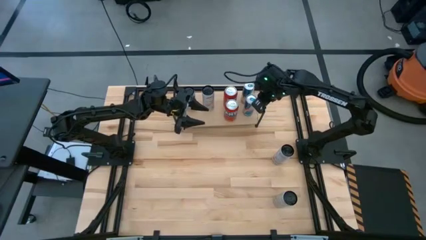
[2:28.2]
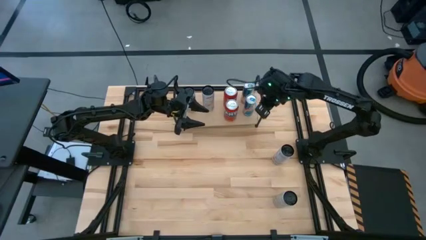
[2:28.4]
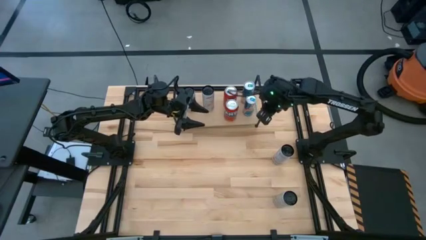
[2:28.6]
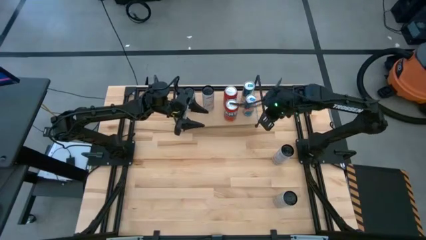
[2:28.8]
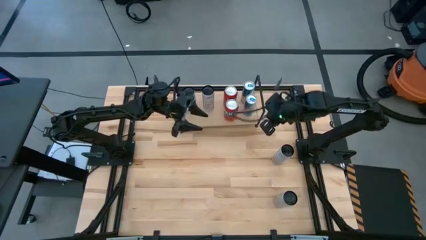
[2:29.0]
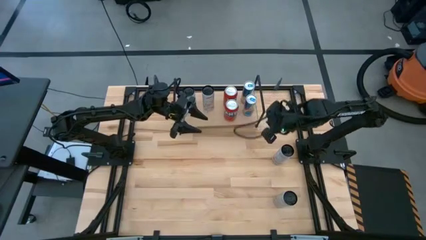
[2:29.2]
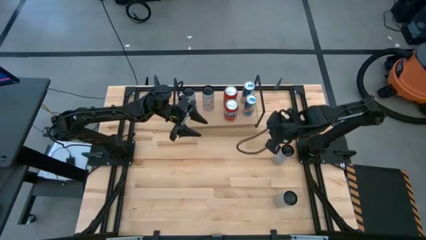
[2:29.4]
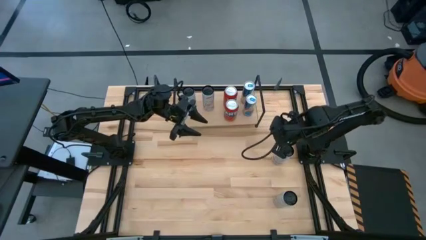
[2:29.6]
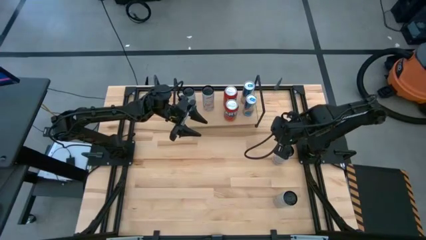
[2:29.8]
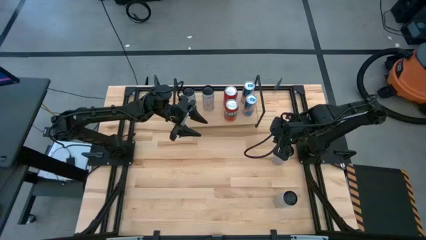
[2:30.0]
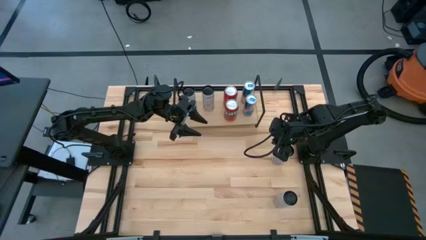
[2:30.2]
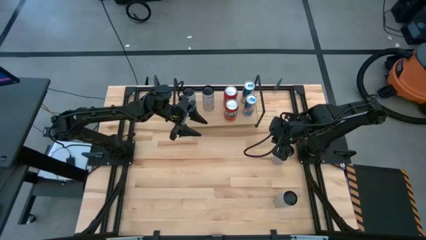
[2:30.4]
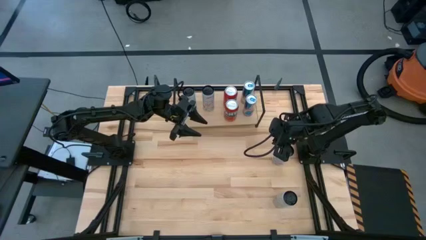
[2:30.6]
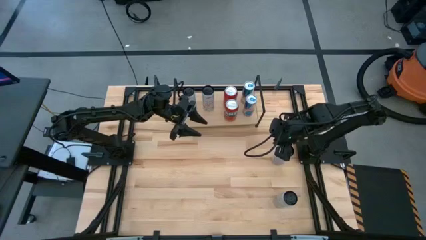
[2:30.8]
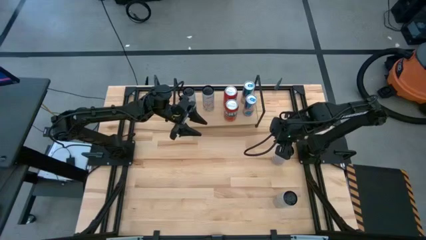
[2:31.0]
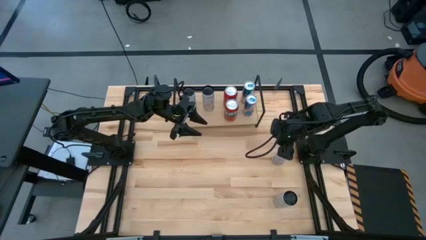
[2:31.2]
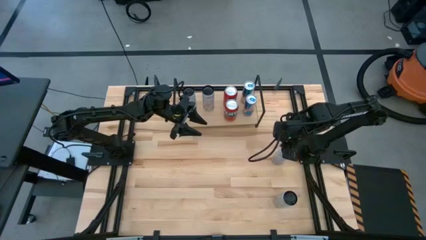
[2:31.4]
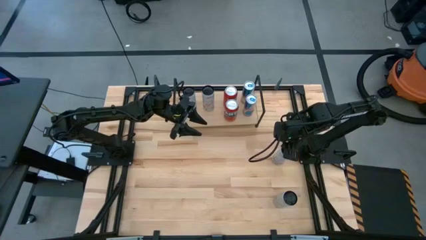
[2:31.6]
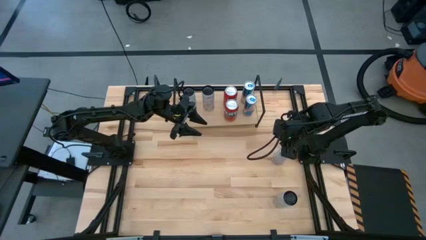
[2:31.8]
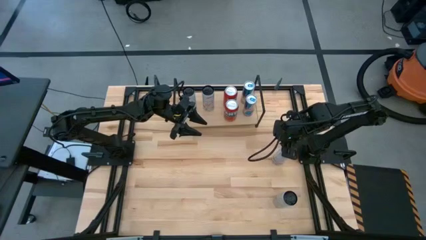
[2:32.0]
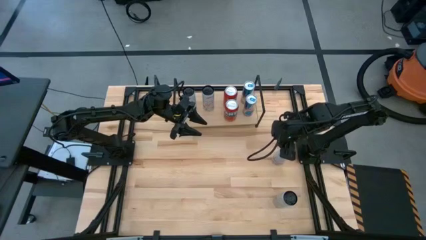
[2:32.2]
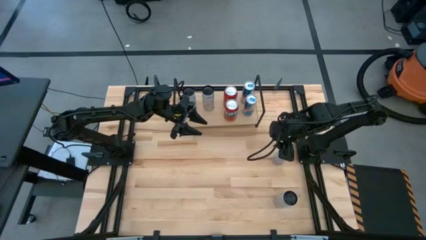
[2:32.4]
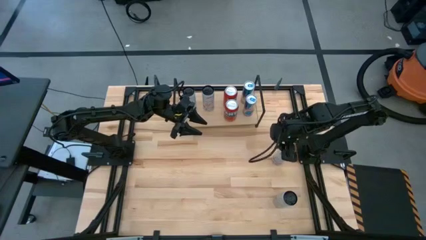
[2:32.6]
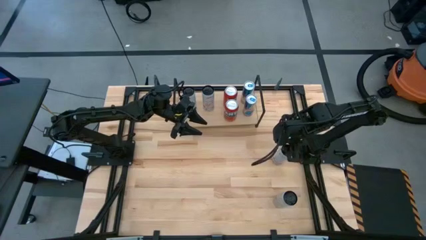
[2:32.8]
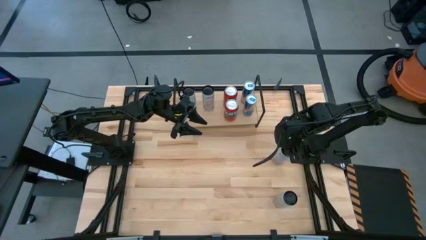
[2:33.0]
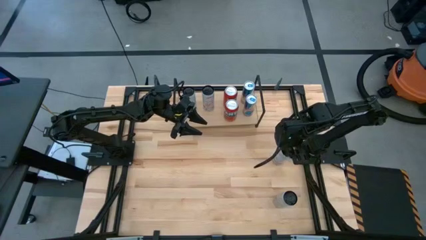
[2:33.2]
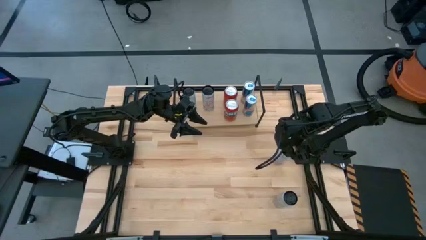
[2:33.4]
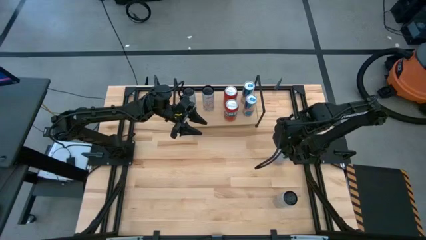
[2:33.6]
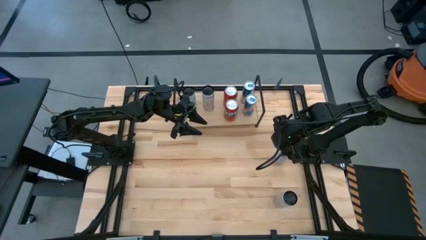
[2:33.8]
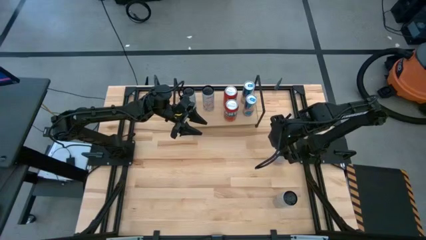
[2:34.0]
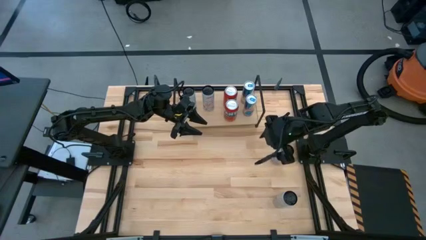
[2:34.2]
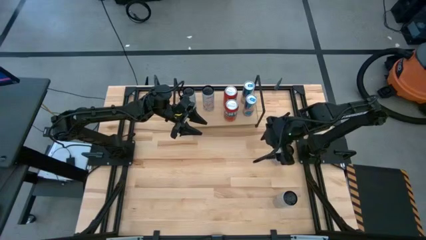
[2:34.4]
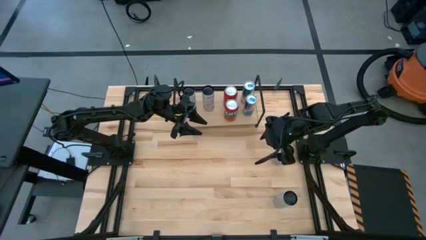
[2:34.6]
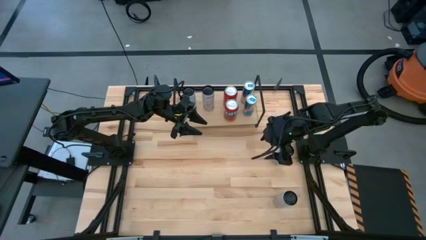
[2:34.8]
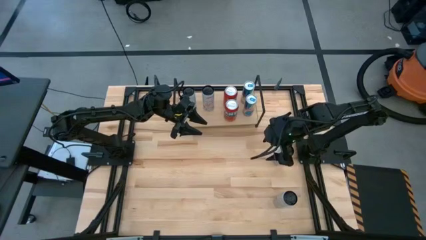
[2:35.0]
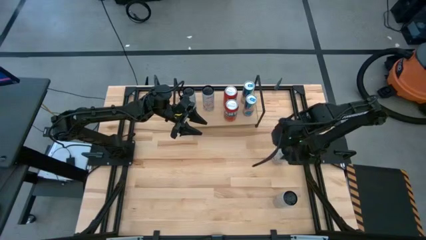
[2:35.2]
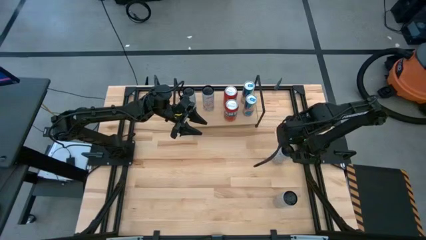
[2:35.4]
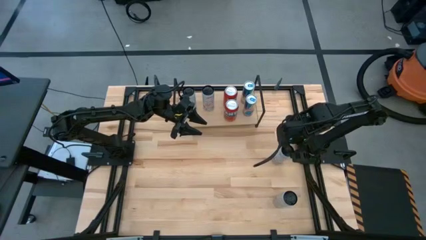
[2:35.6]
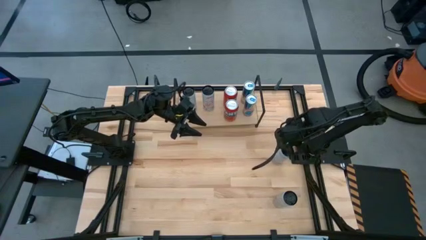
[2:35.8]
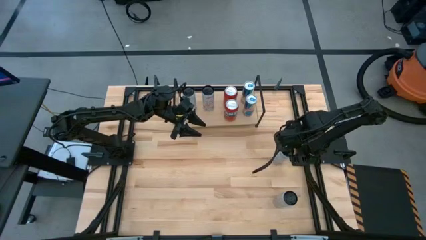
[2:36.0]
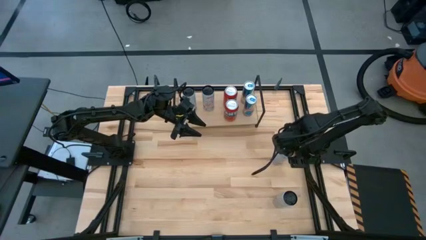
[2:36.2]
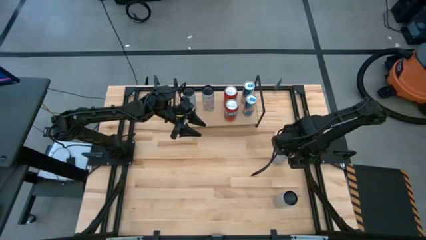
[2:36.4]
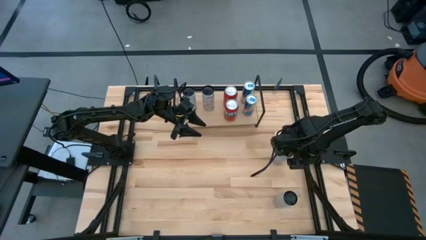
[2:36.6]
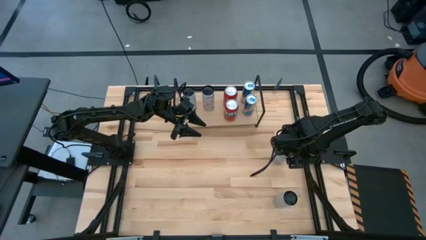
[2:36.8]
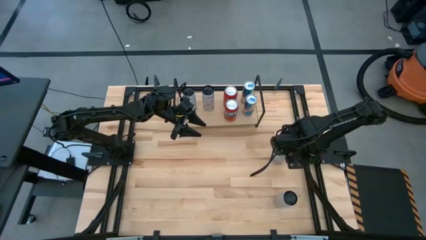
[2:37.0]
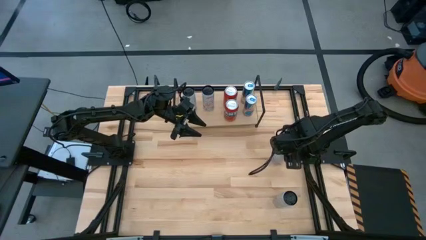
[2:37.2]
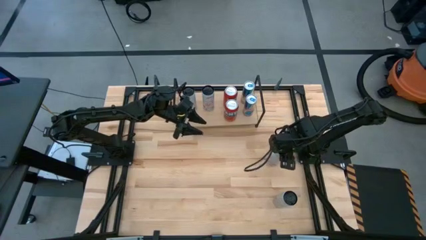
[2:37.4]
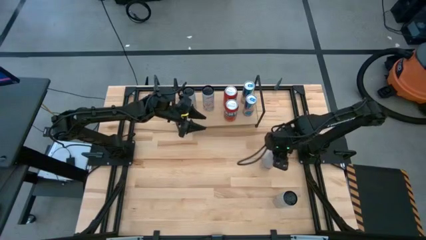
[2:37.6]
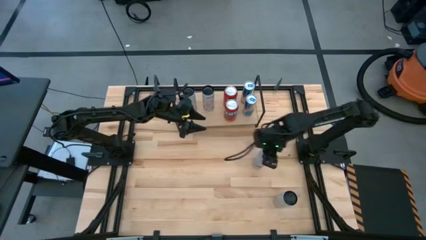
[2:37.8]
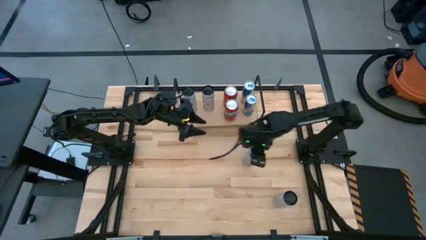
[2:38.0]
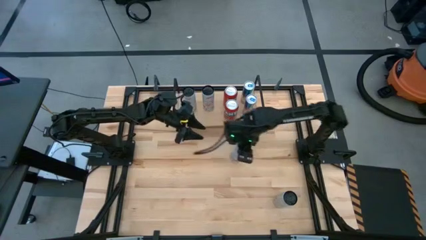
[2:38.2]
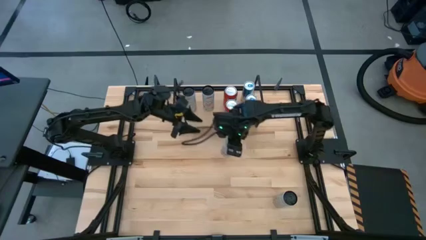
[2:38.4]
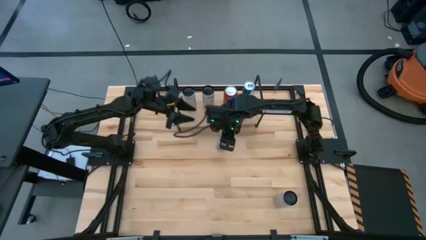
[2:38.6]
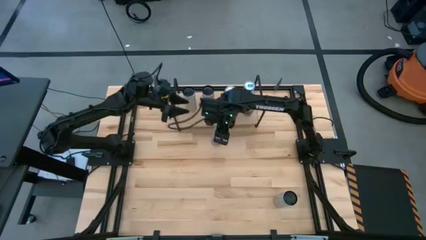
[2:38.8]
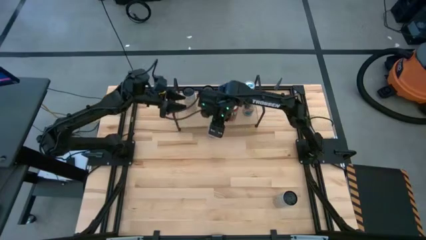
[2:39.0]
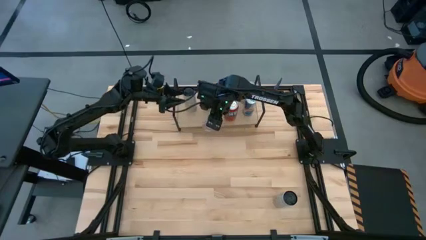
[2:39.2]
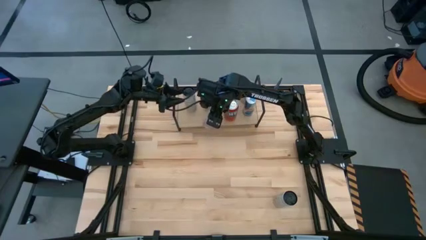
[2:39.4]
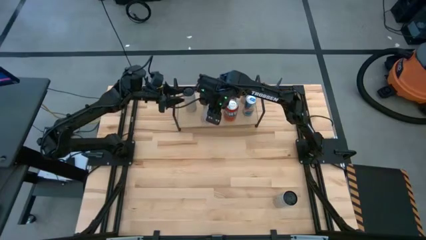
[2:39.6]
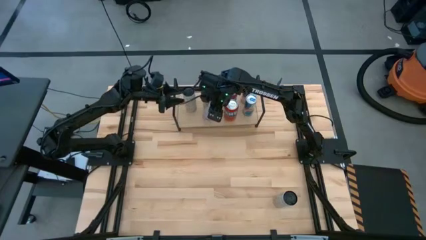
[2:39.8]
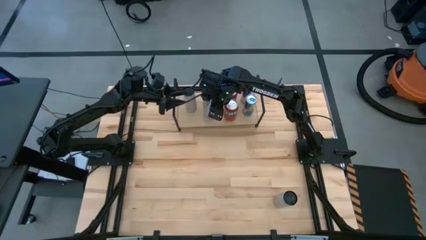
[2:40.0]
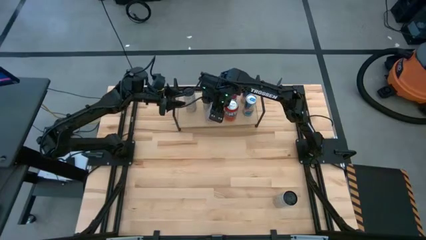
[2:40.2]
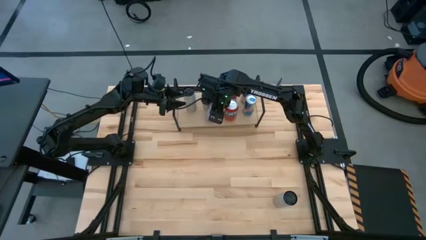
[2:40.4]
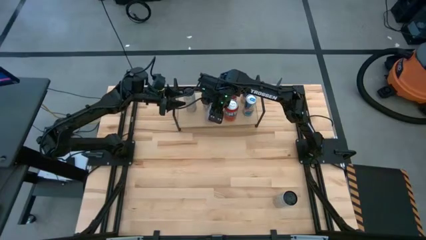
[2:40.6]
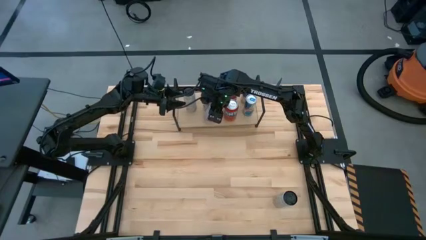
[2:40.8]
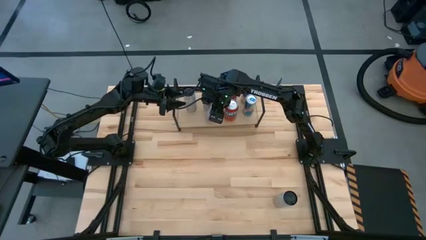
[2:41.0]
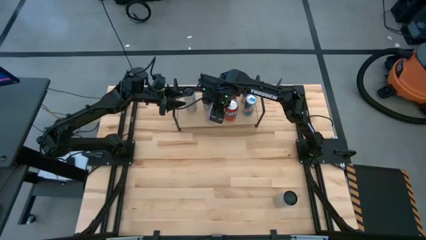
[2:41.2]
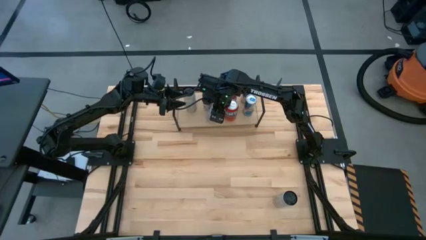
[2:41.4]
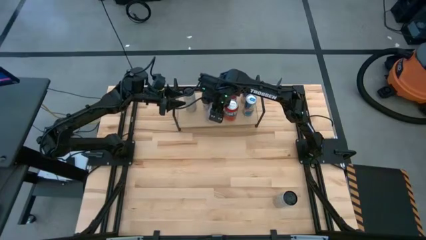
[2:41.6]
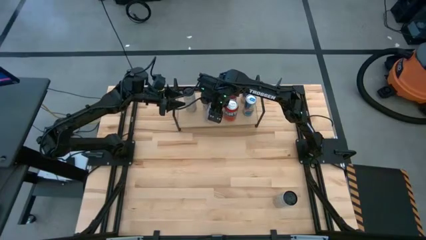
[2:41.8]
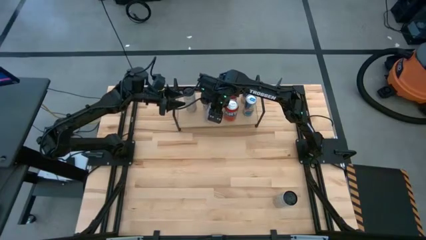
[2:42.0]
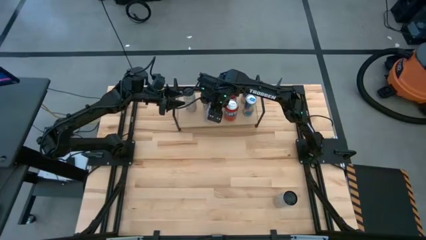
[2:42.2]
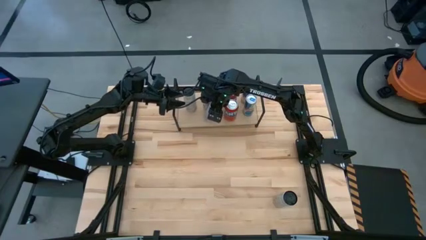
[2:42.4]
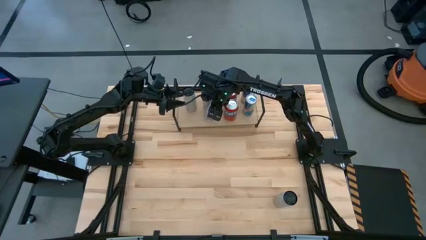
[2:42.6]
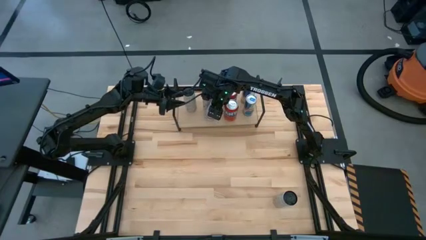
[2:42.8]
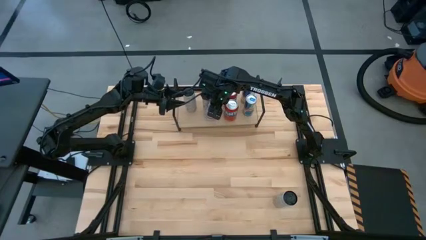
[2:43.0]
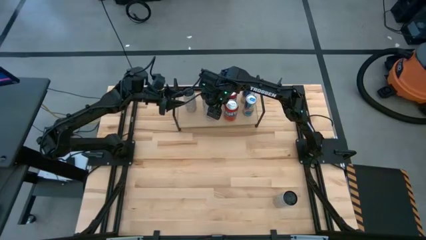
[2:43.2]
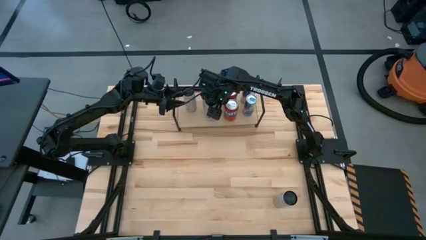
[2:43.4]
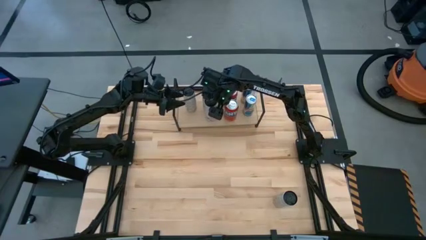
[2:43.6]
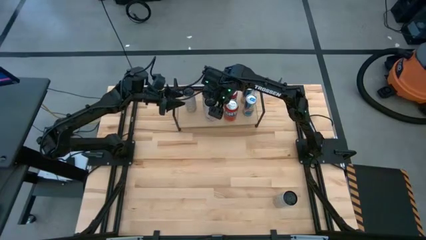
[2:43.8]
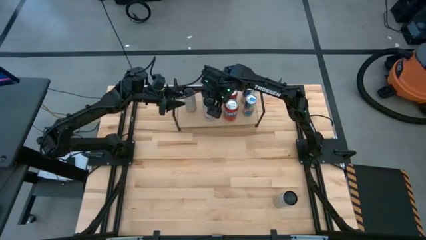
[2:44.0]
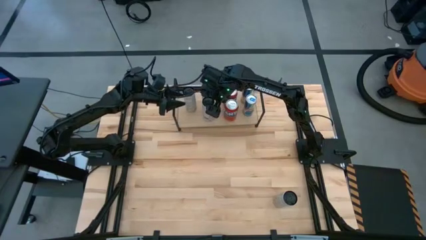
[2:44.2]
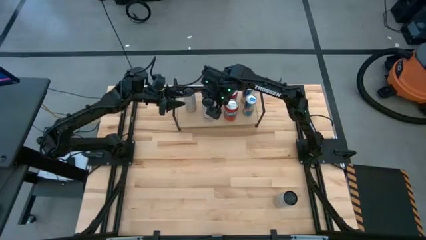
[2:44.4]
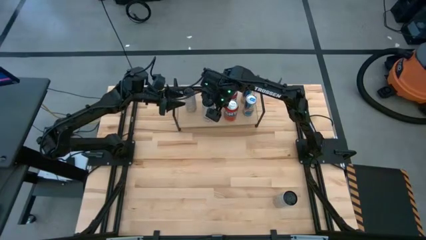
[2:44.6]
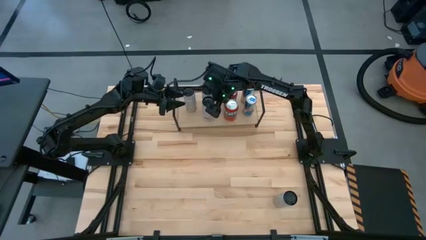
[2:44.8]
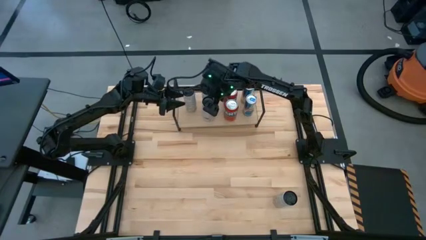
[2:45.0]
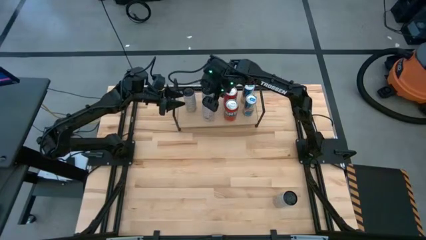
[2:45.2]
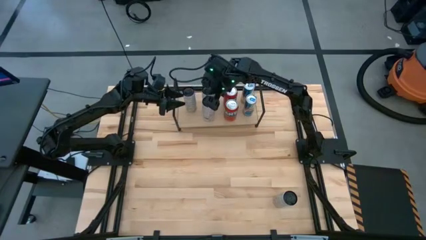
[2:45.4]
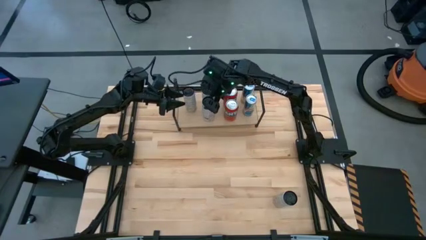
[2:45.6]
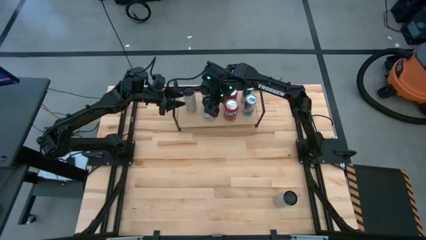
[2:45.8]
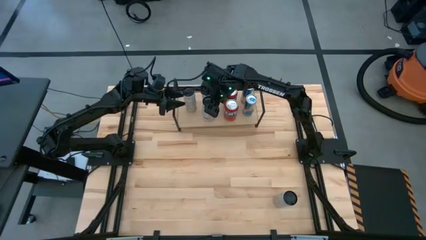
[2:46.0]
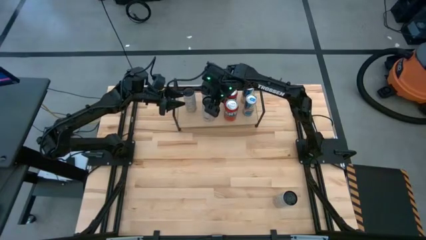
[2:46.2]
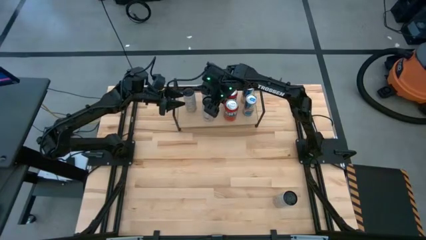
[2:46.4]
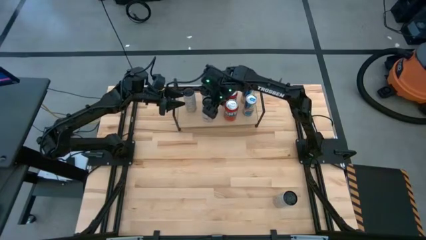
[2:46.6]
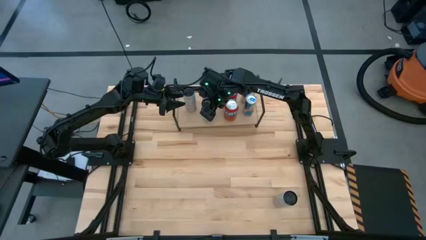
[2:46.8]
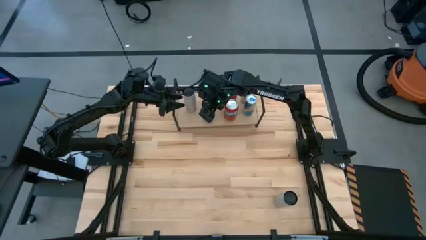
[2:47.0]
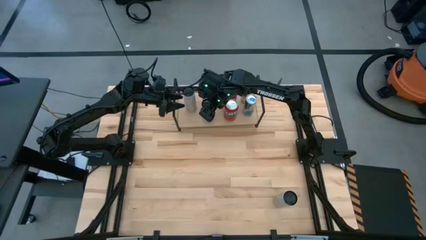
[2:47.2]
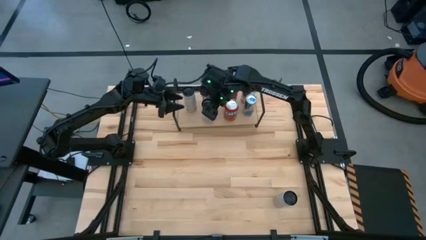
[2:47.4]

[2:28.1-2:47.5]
Task: Place canned beverage on shelf
Put the top white and pink soda can aligned with the other white and pink soda can on the shelf
